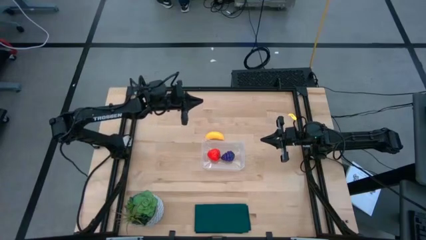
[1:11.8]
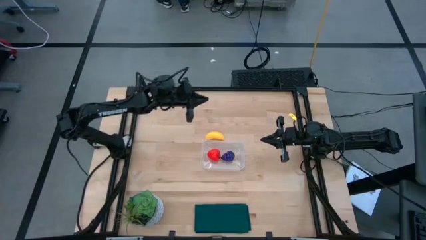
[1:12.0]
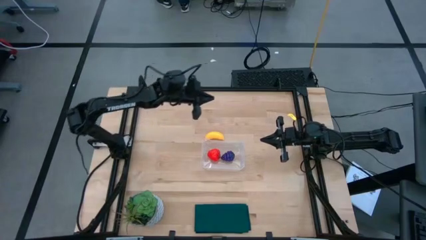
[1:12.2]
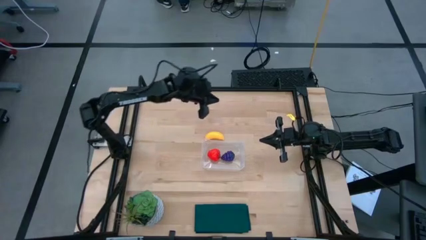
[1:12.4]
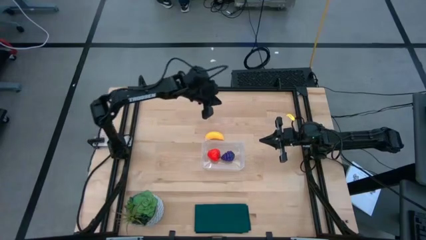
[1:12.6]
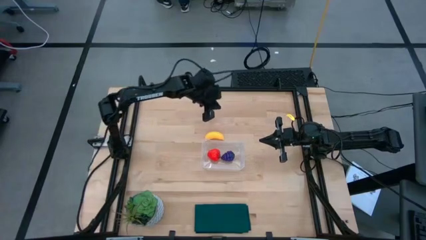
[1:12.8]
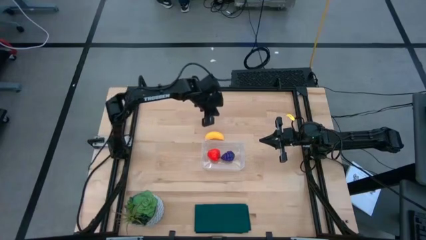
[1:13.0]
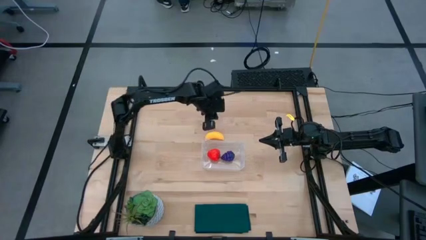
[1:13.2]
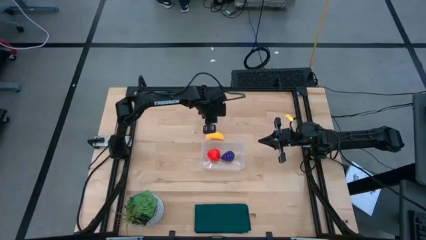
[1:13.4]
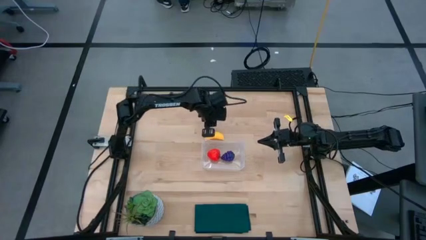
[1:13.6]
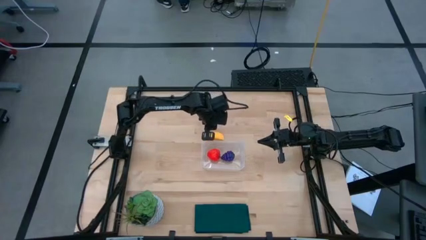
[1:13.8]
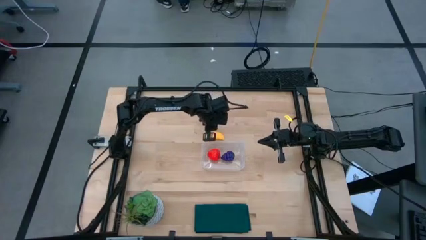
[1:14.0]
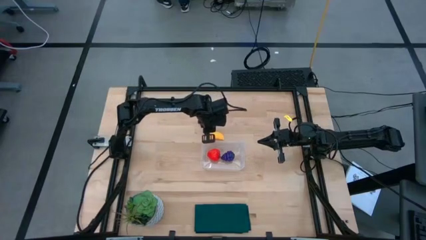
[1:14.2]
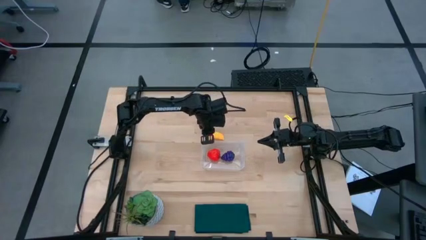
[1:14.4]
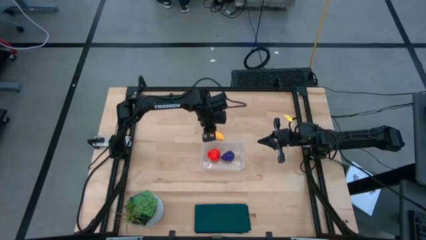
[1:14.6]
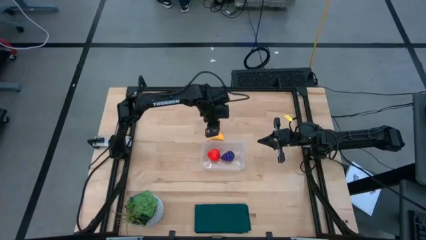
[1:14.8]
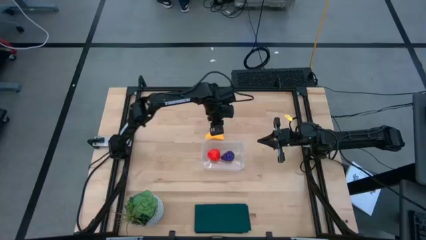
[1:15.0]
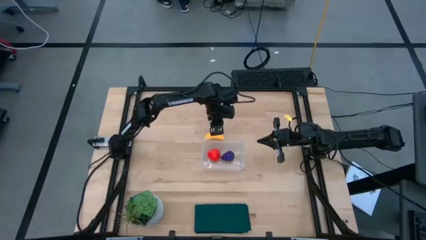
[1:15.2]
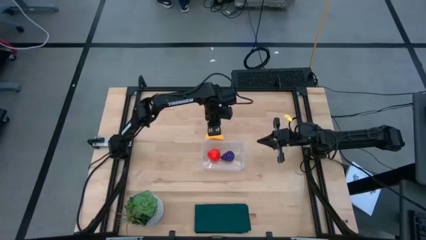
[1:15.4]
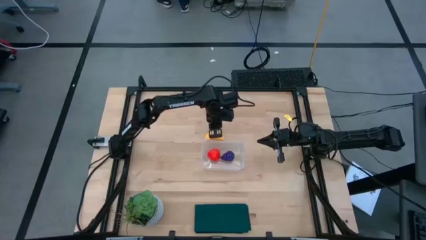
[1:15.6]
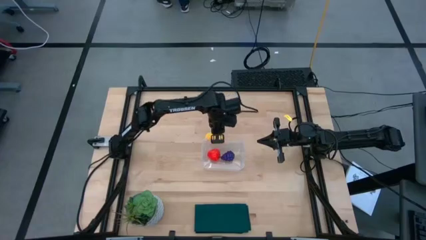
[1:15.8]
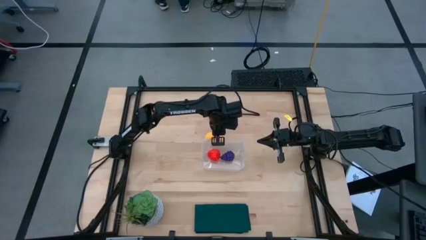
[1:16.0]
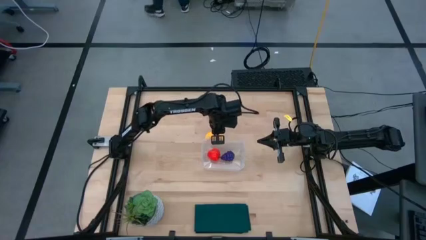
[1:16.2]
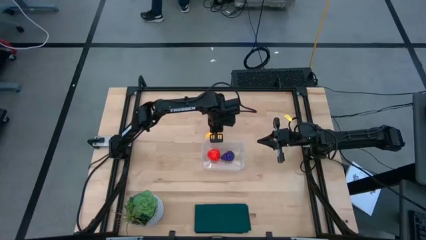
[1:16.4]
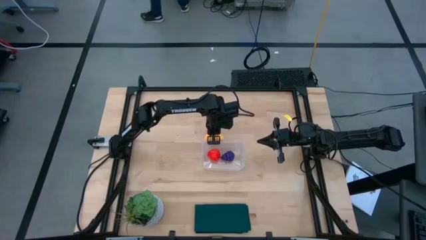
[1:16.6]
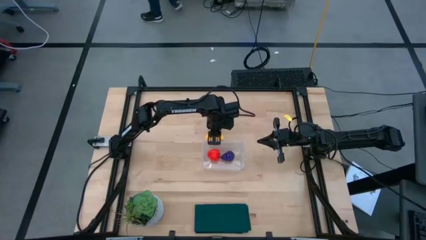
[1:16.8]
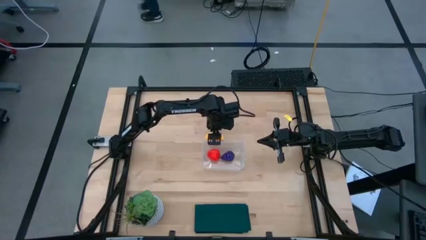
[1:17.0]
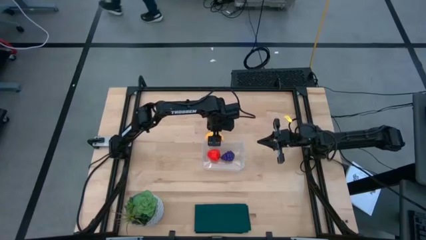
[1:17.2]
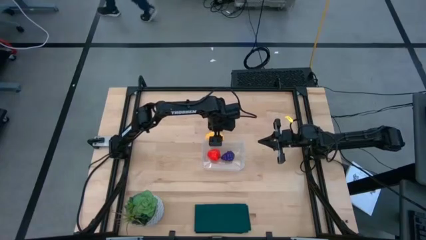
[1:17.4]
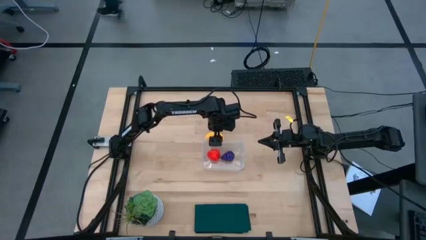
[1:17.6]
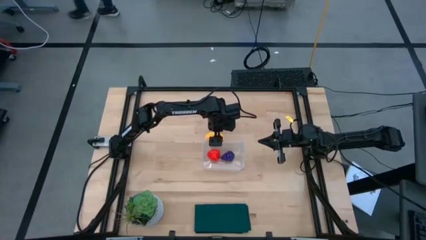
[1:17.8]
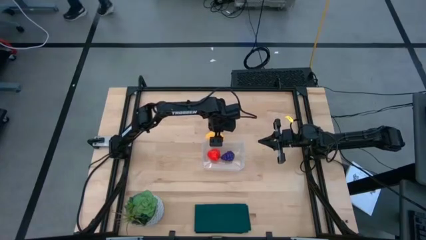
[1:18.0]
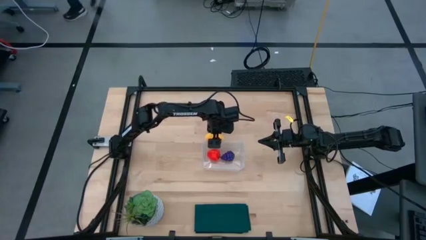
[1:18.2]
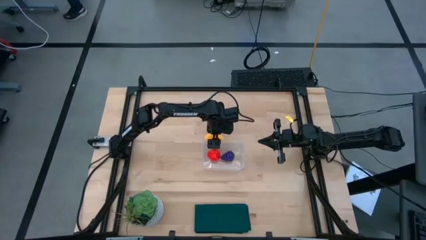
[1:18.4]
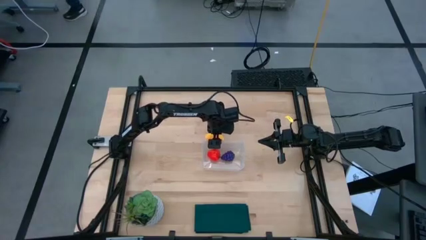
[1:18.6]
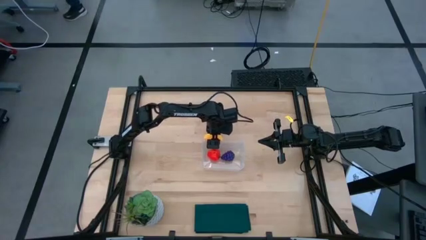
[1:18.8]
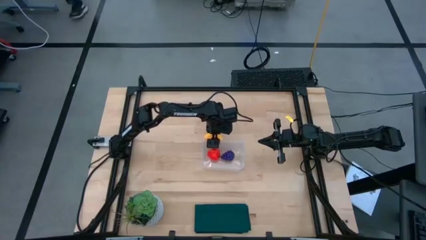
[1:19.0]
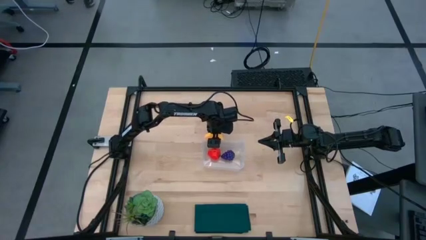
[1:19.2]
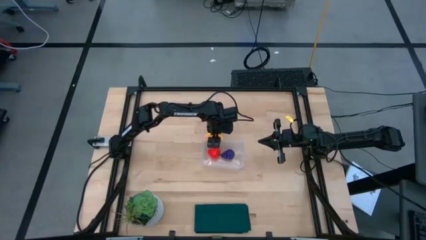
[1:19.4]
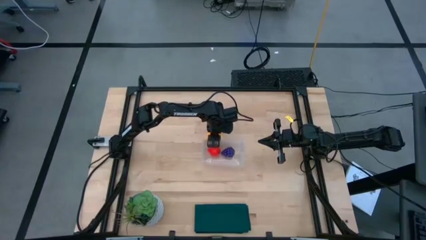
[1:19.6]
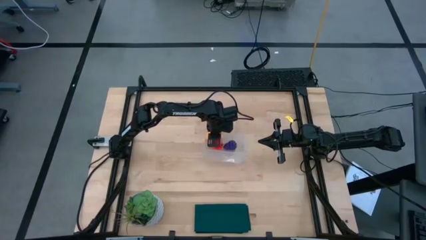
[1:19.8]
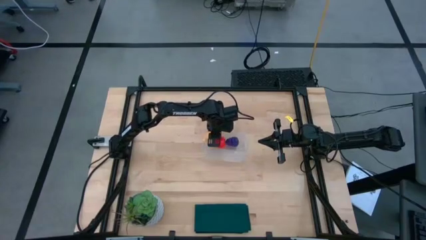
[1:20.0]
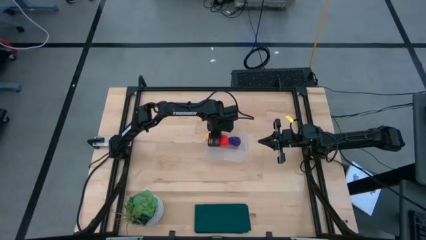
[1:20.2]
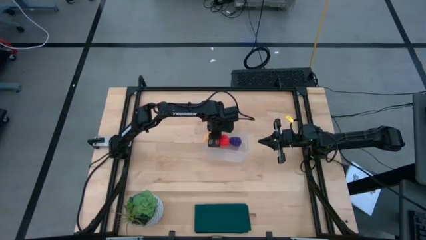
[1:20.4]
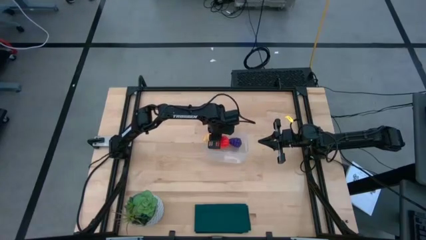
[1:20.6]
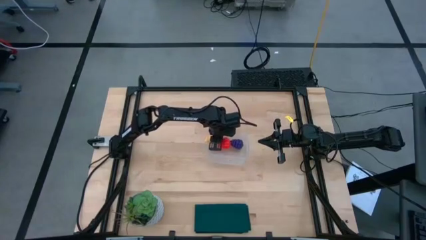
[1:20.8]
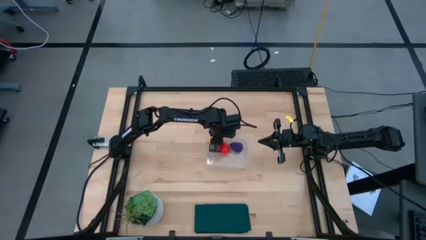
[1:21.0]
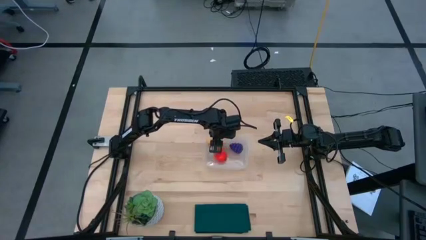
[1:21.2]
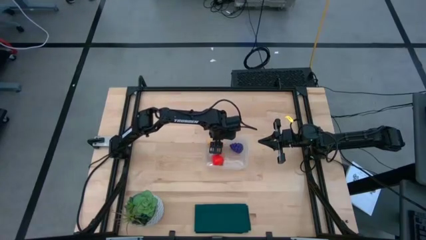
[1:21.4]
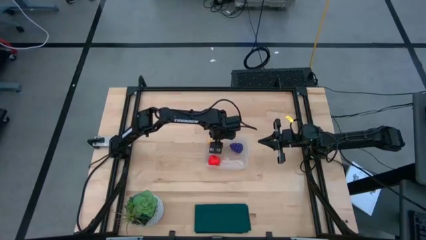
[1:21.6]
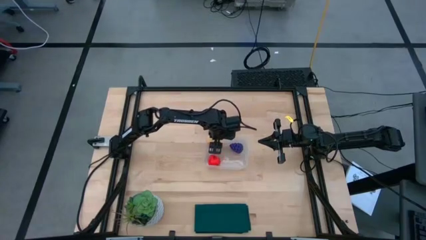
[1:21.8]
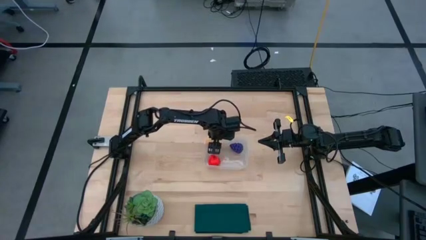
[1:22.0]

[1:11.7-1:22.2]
Task: Pick and placing Produce into tupperware
Put the banana into the transparent bin
